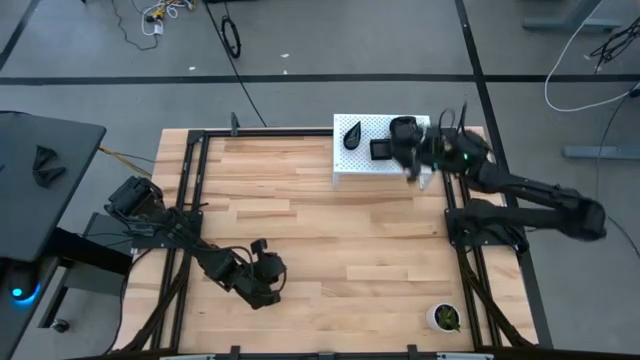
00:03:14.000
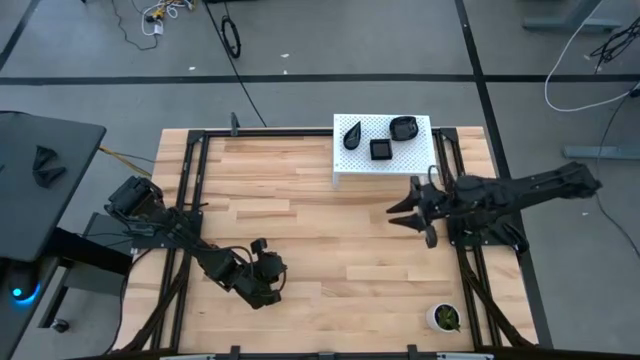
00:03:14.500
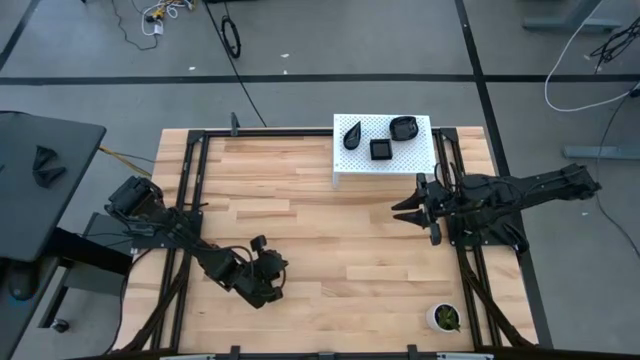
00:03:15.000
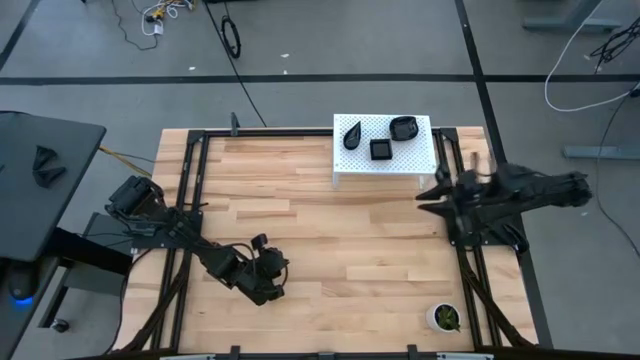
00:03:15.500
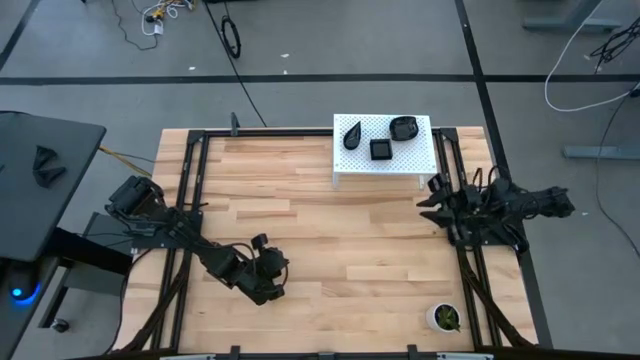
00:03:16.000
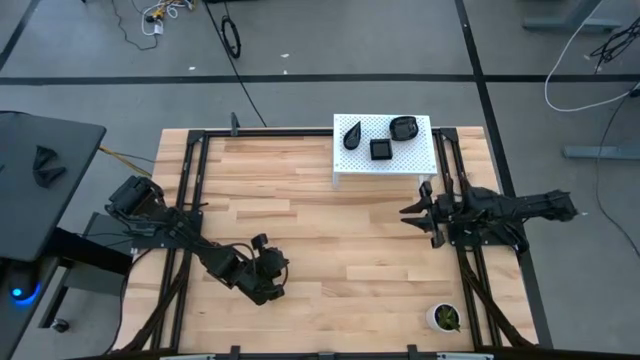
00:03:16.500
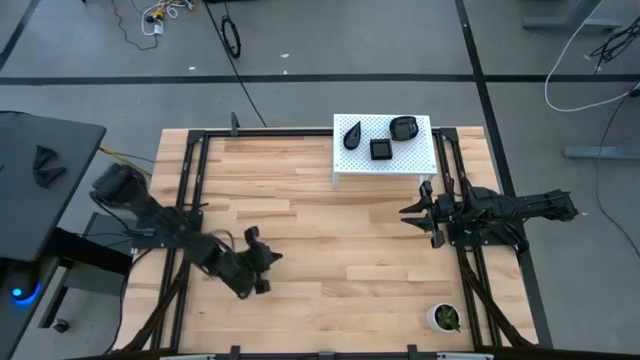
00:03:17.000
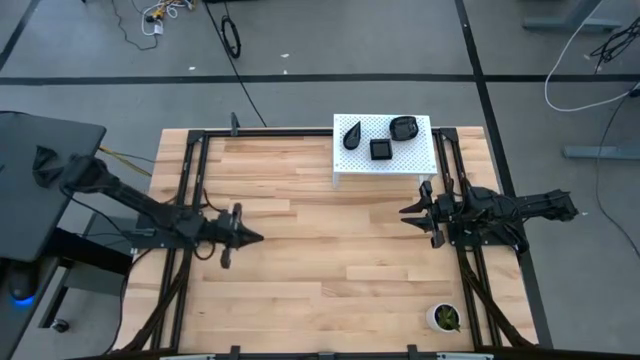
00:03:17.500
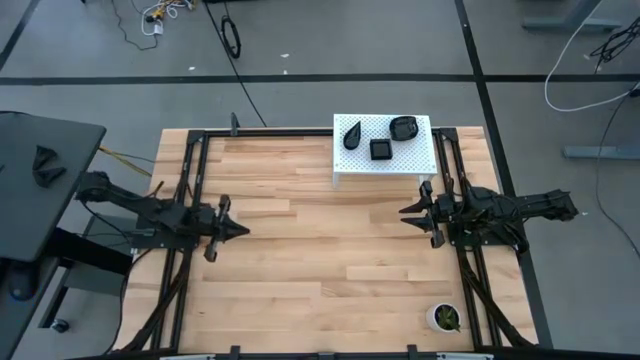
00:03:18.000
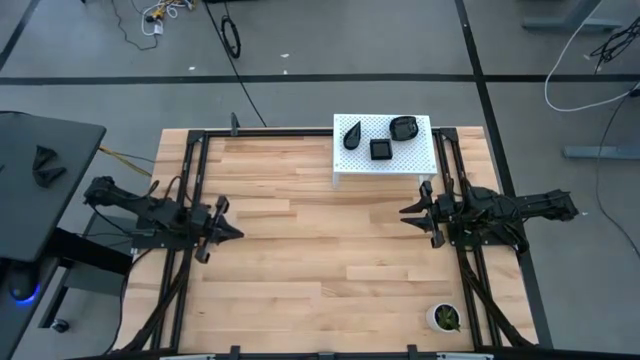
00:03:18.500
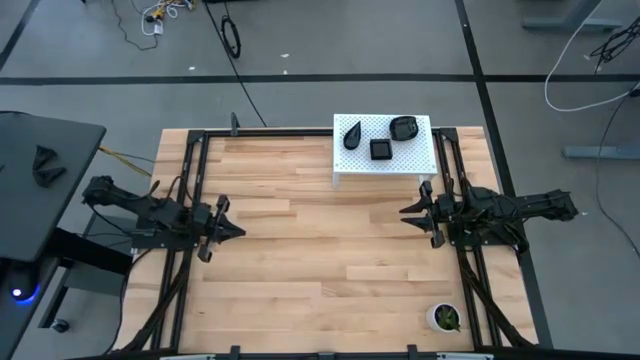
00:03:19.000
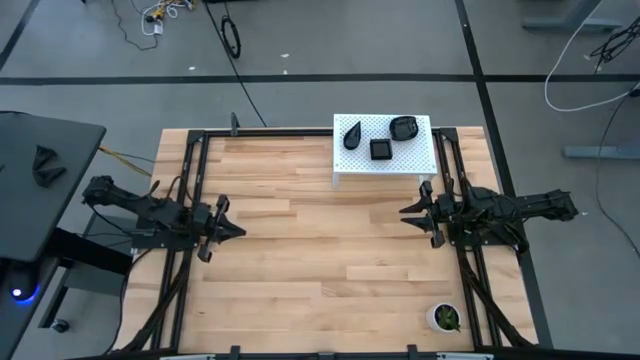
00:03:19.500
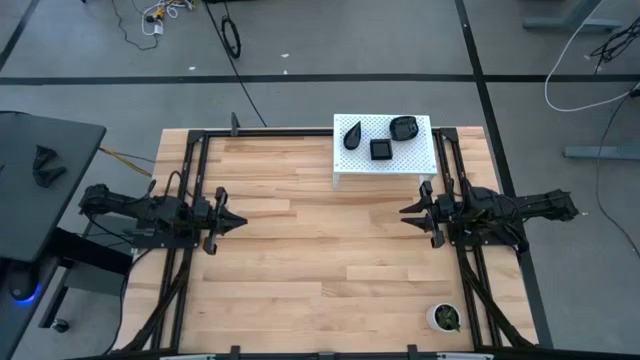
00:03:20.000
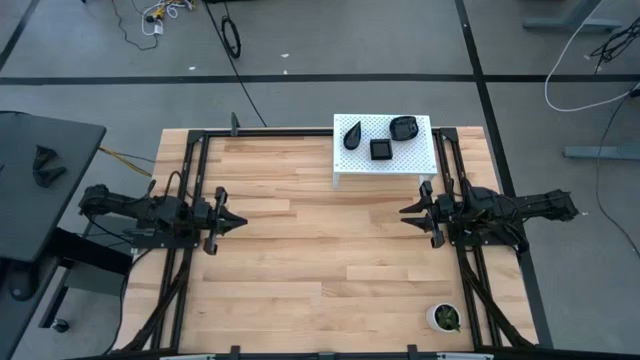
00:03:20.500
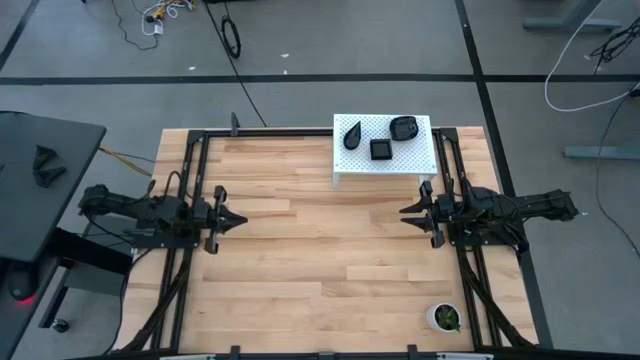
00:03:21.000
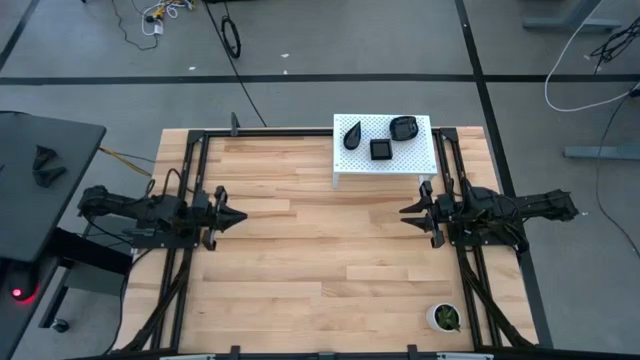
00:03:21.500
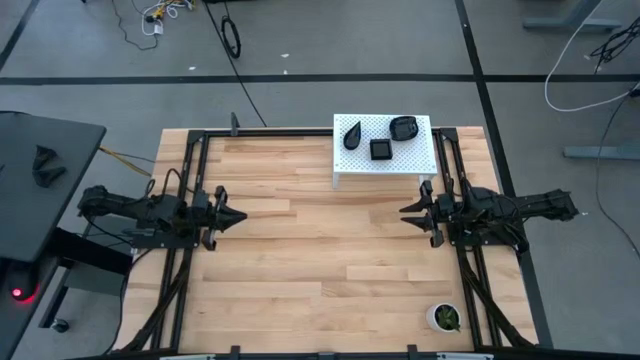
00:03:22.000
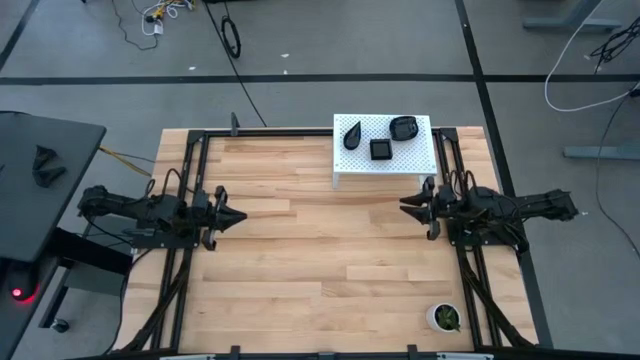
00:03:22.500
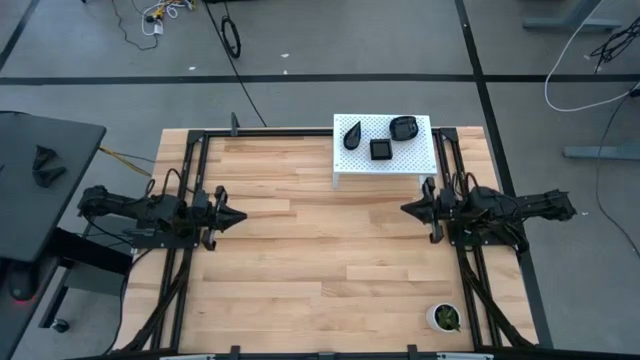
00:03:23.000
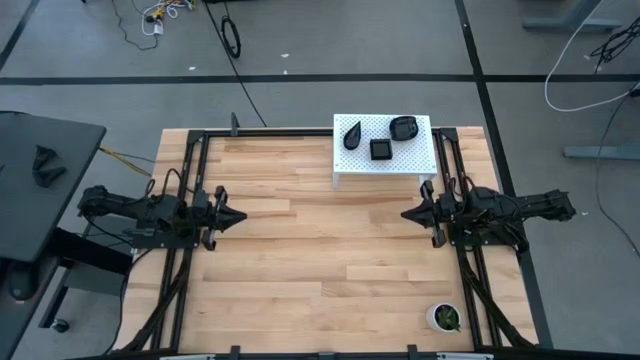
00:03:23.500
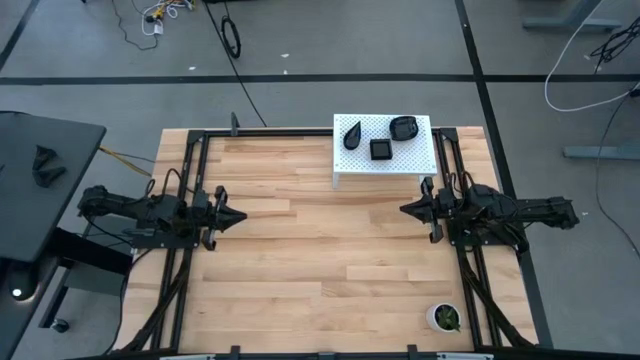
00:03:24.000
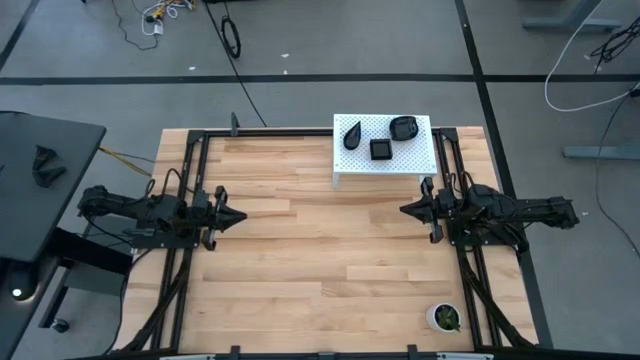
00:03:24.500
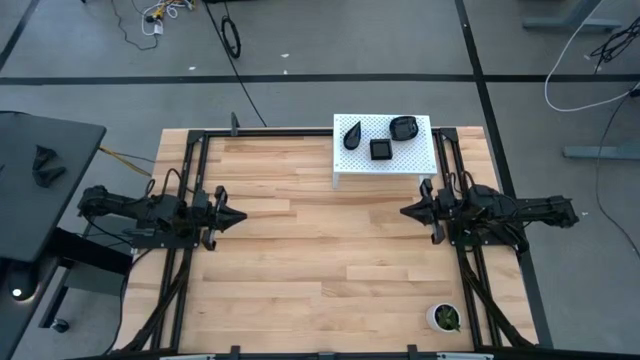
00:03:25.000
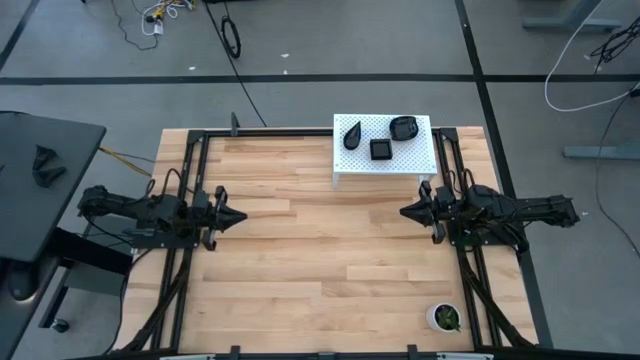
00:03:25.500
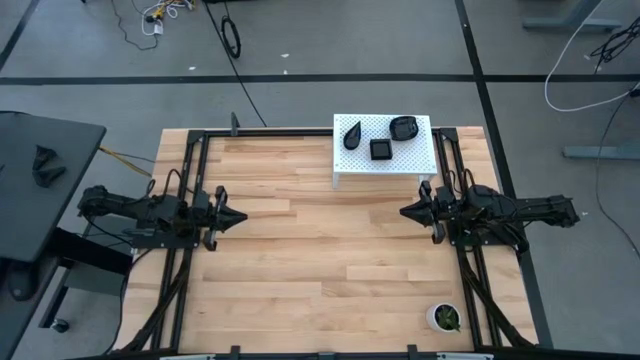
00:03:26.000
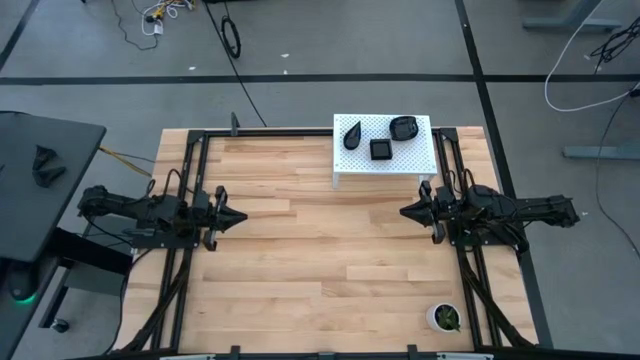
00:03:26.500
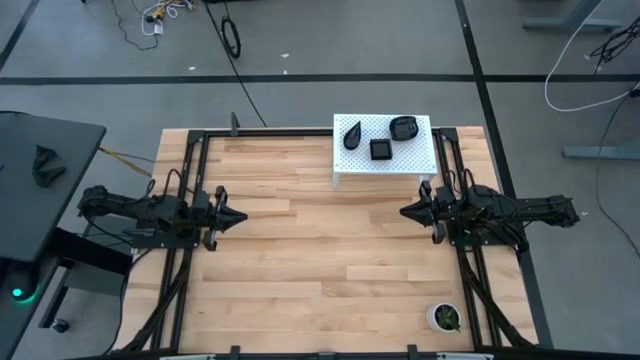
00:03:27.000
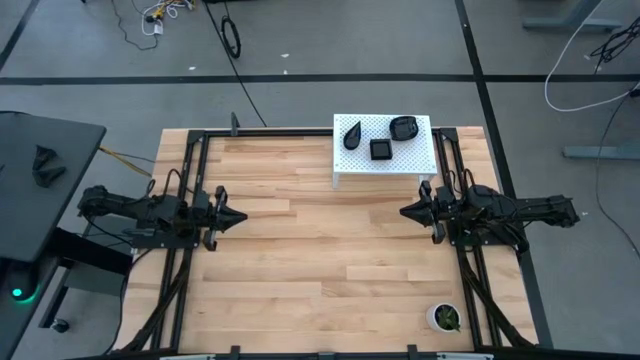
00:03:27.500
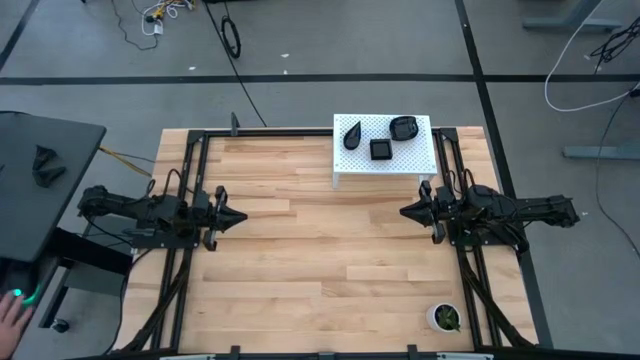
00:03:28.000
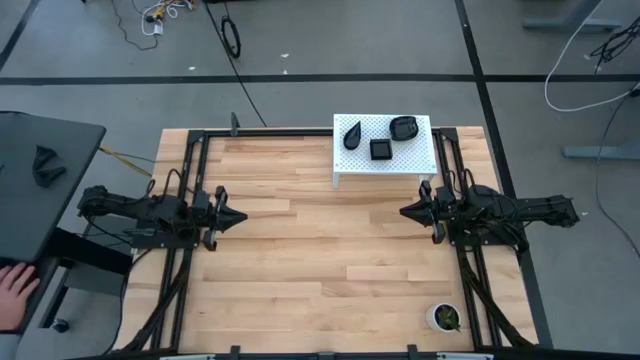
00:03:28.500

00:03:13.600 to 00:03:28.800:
Task: Pick & Place Mini shaped plates
Return to Home Position
